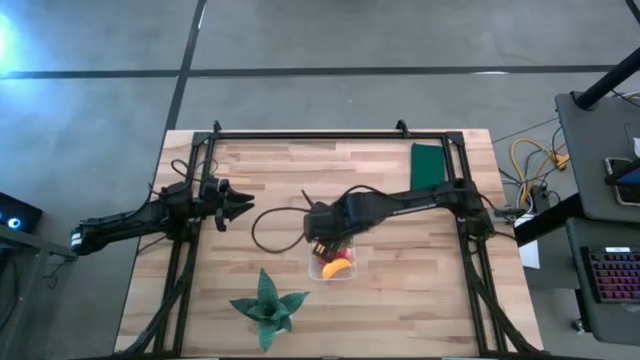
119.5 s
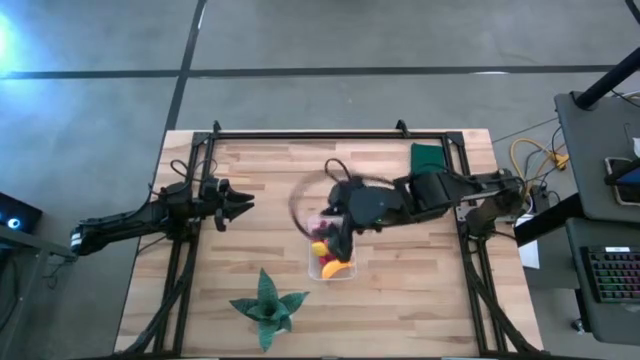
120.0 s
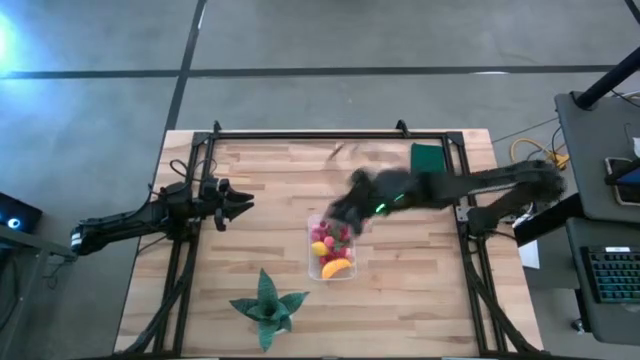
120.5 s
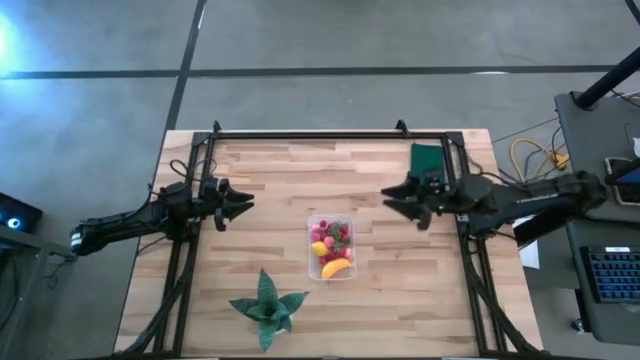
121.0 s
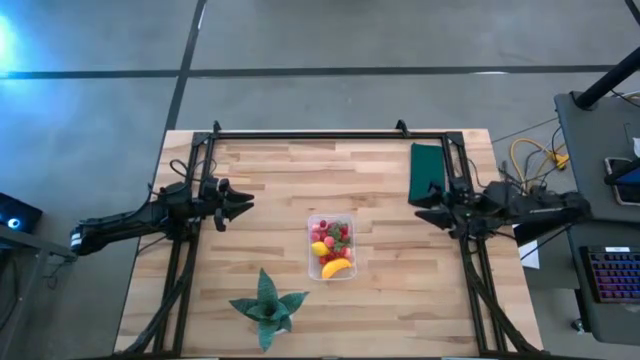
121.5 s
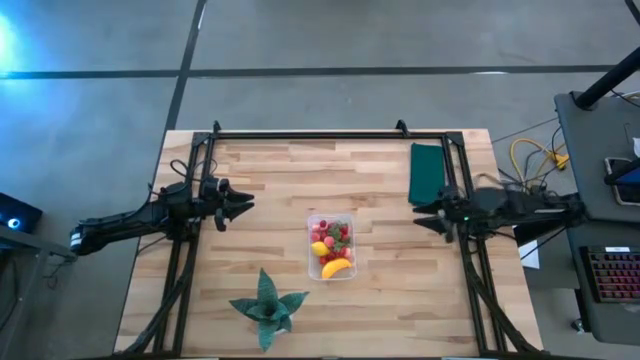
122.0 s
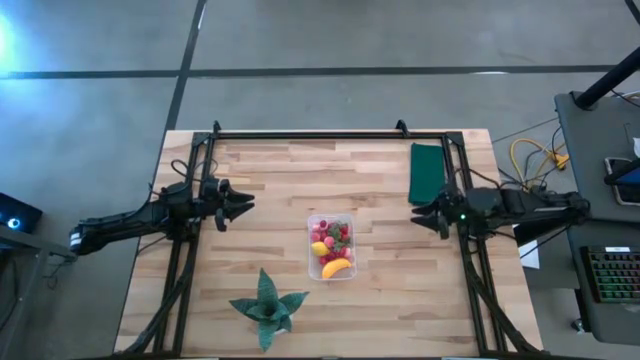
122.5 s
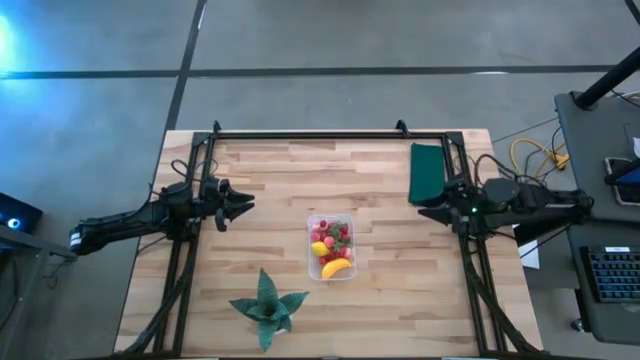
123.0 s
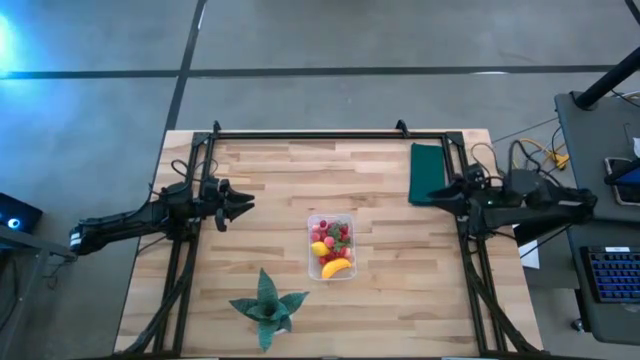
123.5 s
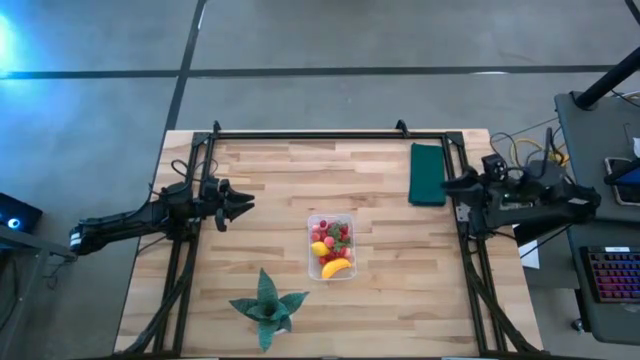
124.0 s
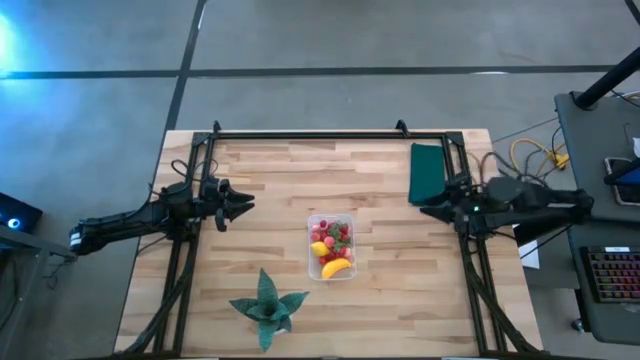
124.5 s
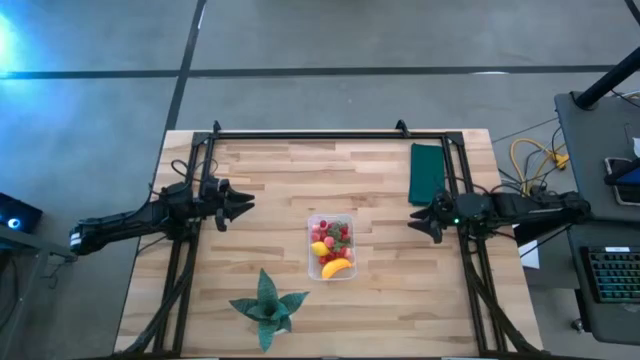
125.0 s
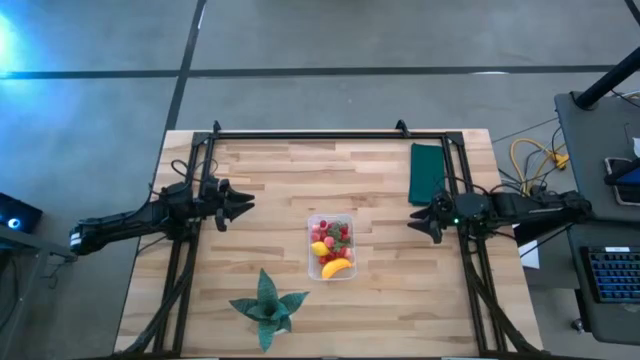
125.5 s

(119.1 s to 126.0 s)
Task: Pick and placing Produce into tupperware
Return to home position

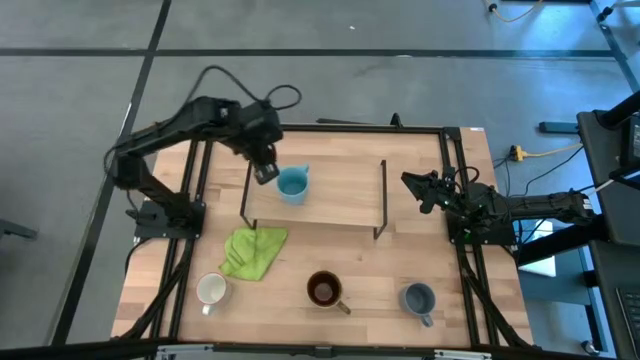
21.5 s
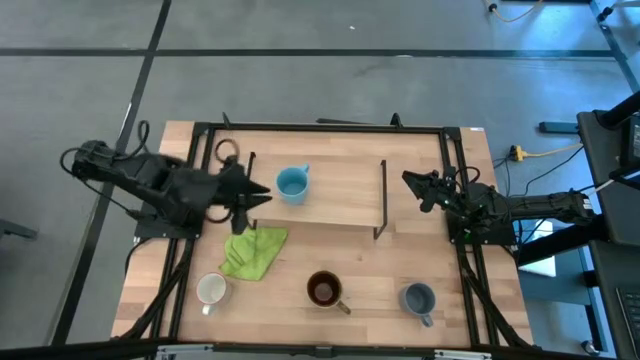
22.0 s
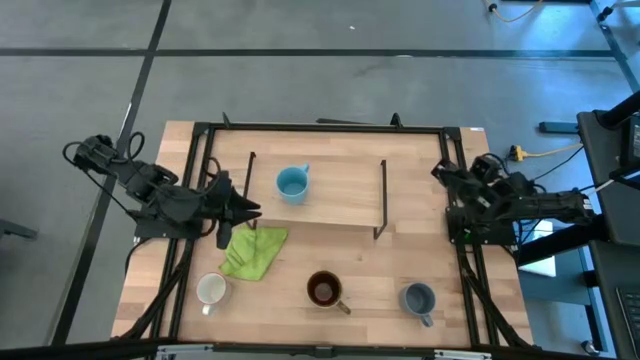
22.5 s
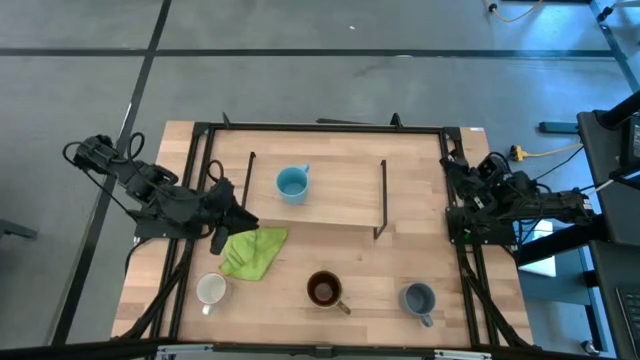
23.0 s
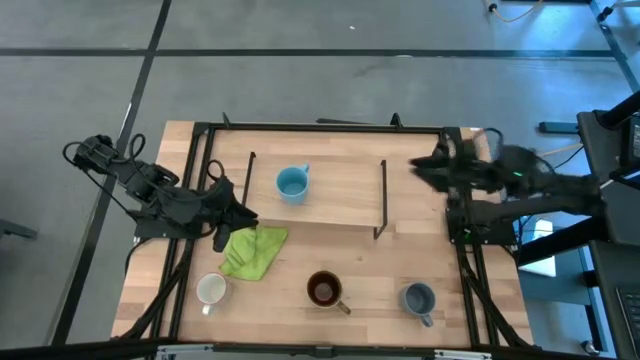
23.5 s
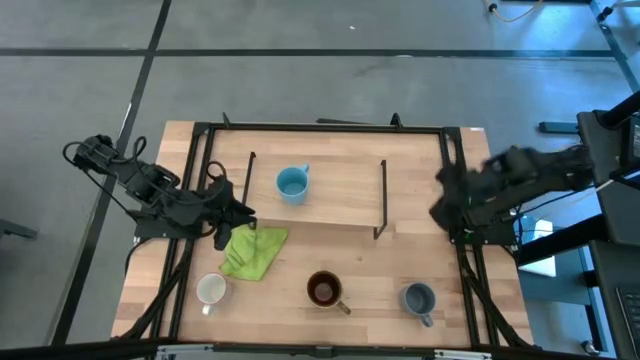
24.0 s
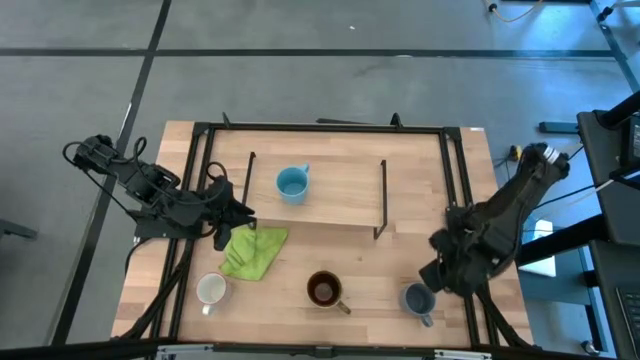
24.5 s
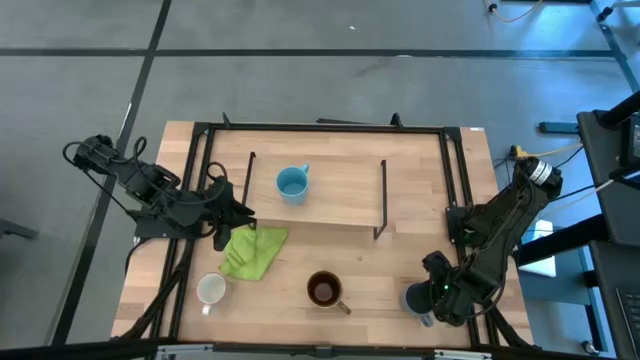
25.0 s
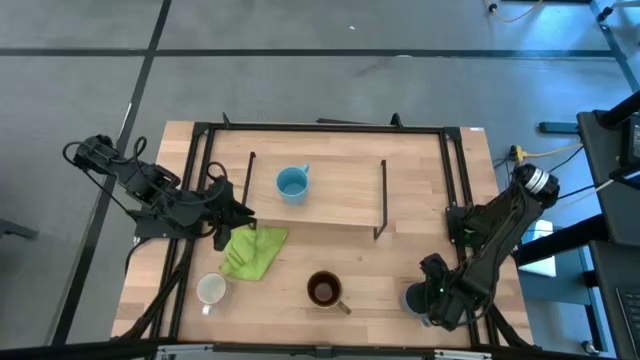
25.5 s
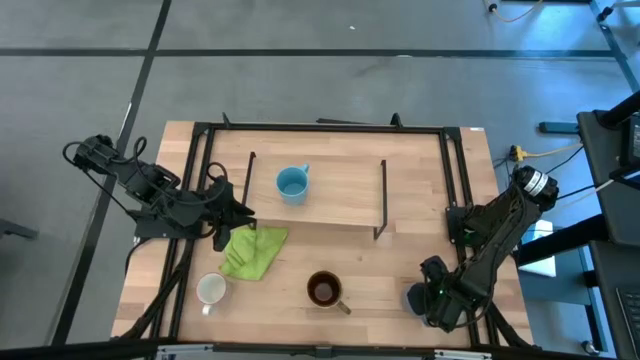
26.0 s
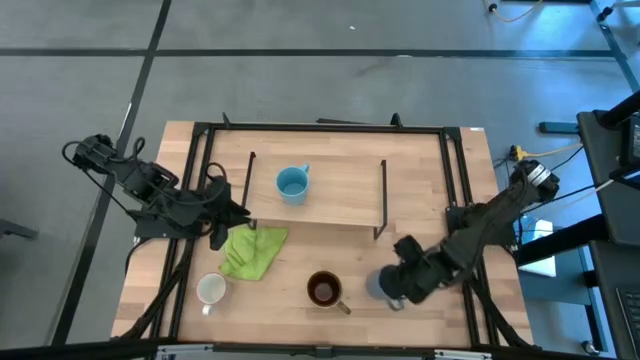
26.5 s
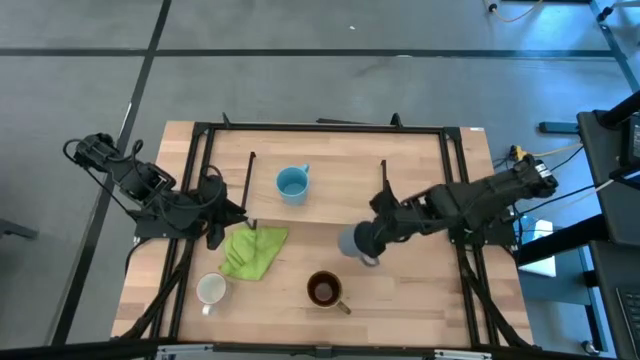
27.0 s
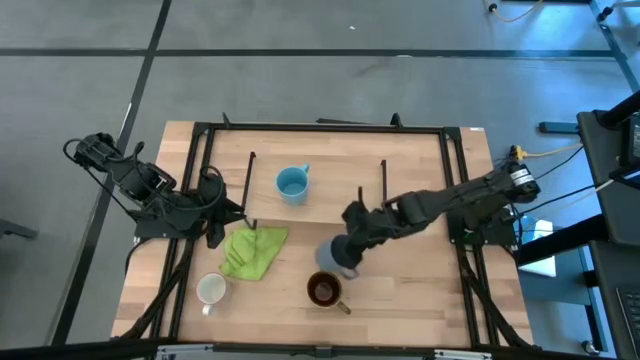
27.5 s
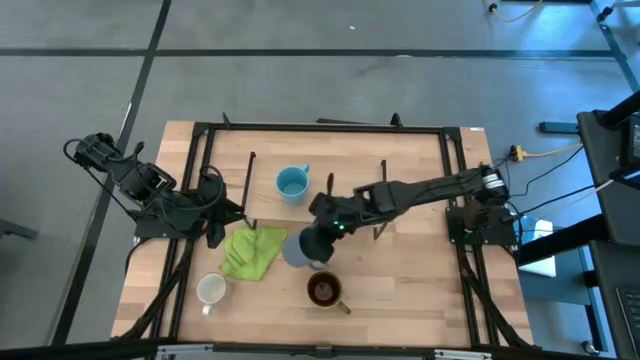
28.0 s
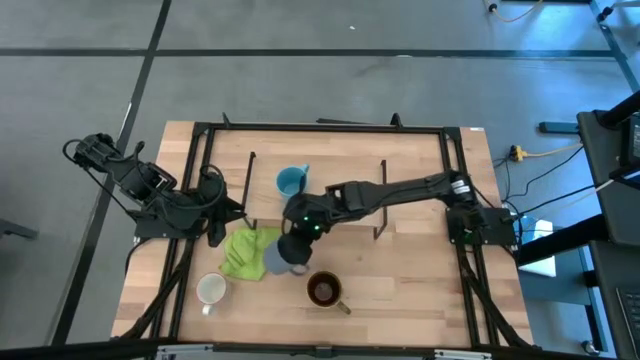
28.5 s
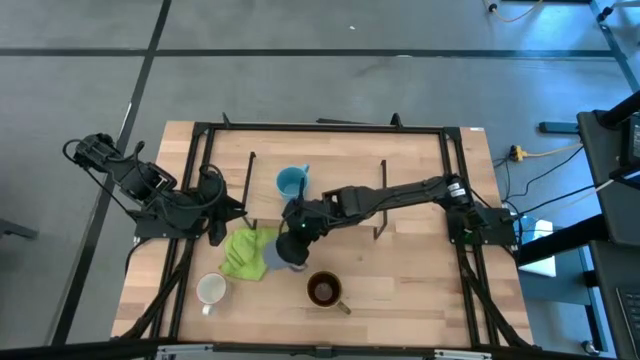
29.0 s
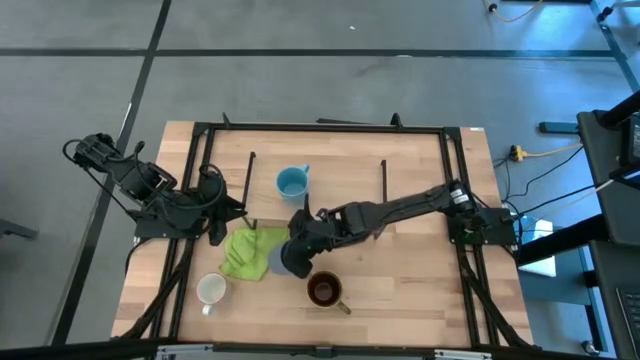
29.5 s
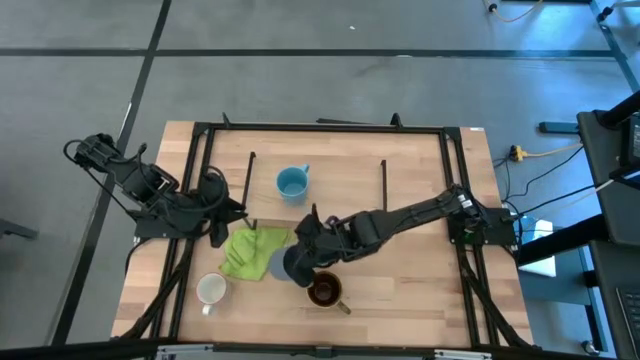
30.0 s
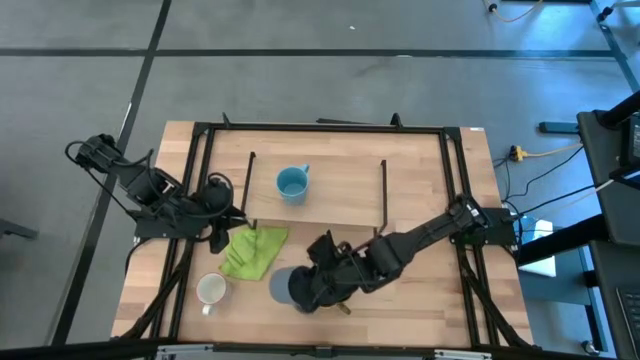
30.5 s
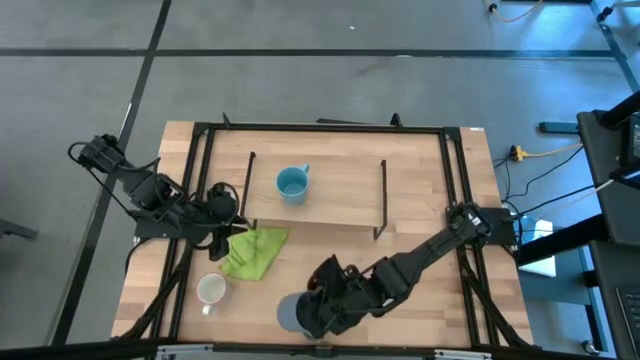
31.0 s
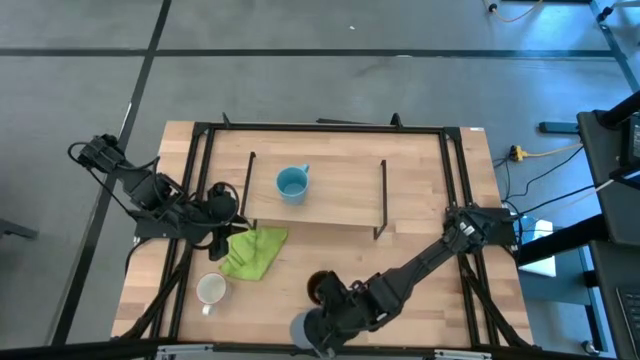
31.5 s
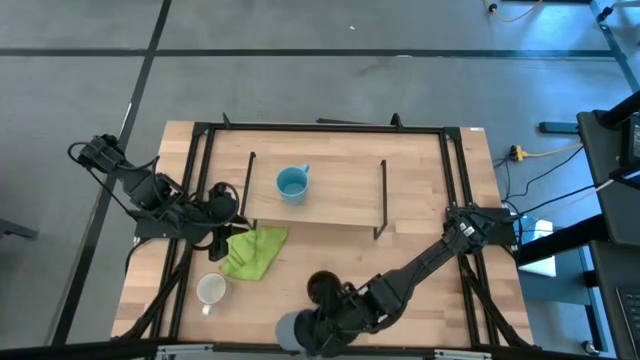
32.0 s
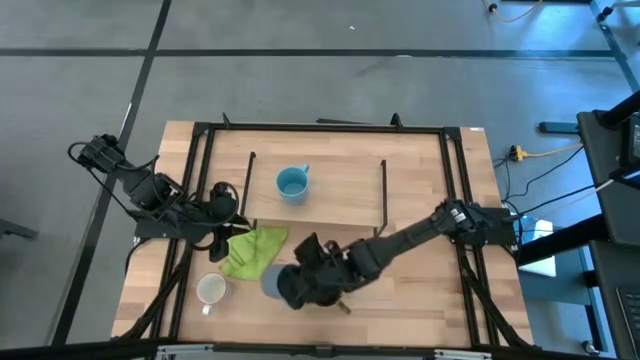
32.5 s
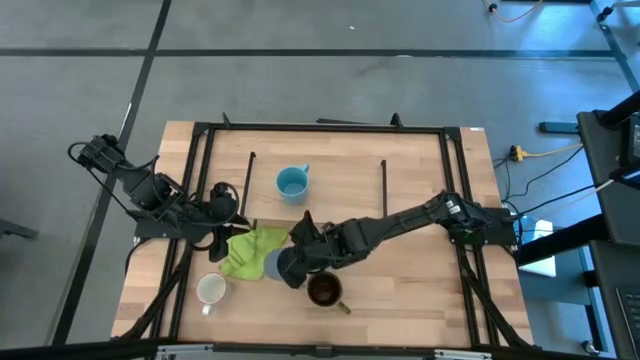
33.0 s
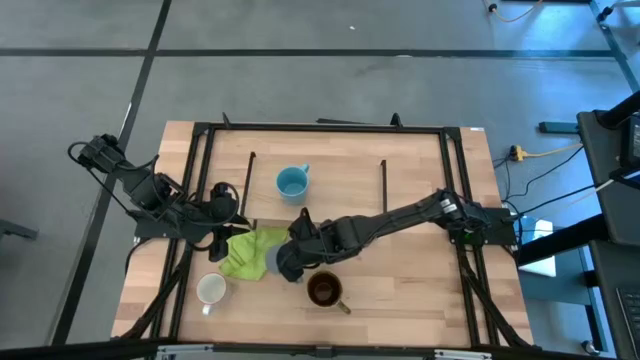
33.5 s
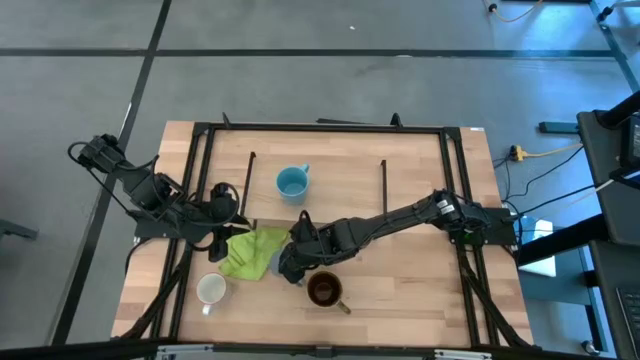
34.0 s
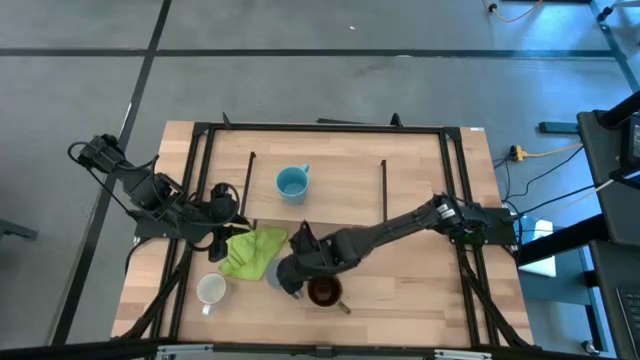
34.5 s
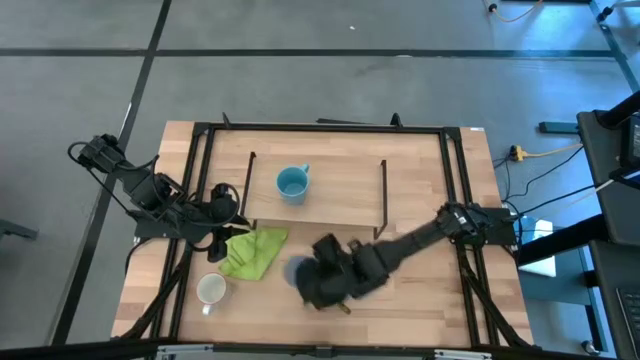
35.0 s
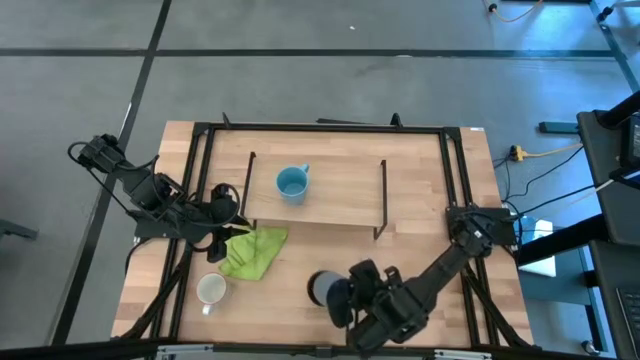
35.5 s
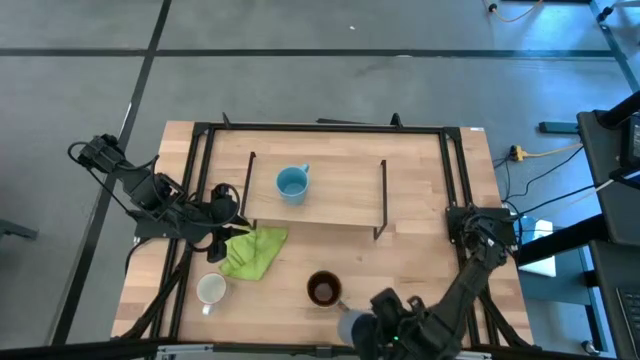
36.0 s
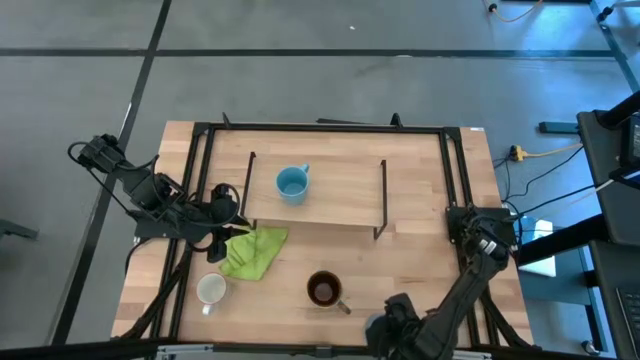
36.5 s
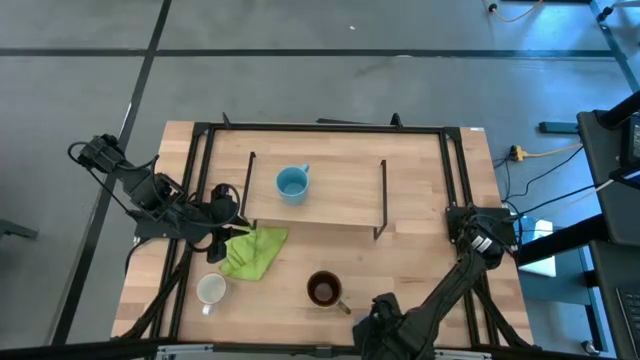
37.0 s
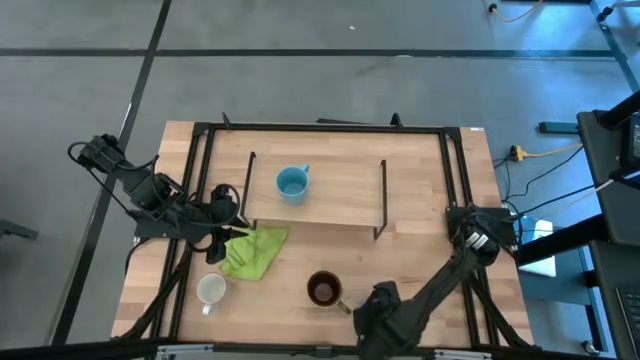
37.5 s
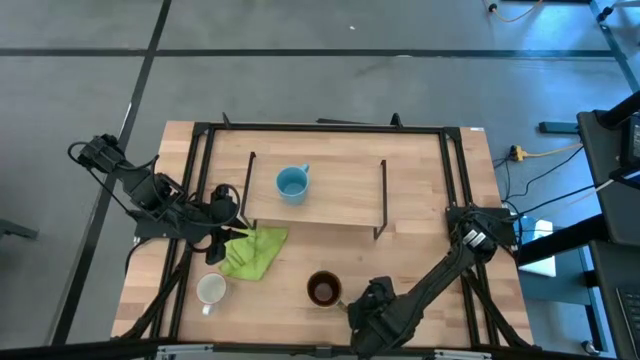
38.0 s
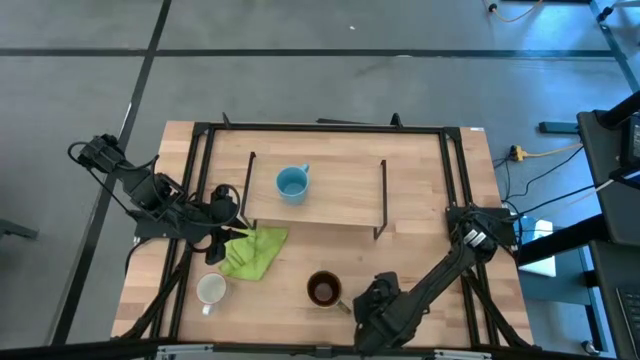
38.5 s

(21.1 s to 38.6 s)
Task: Stack small to large cups/mugs on shelf
Put the gray mug on the shelf
